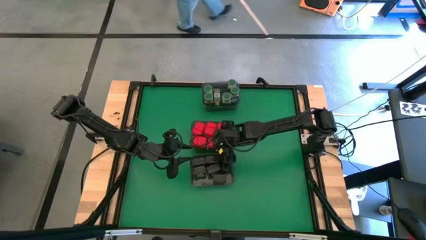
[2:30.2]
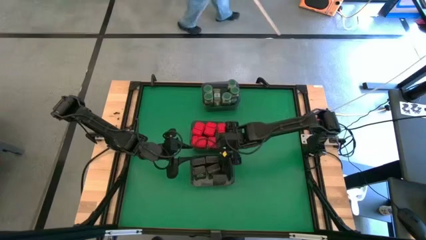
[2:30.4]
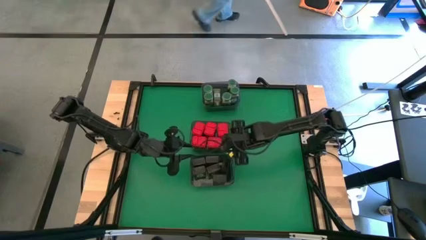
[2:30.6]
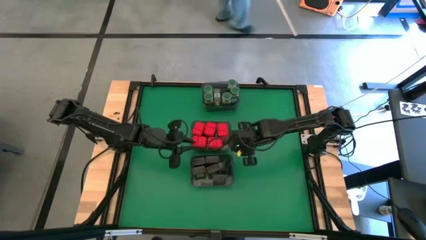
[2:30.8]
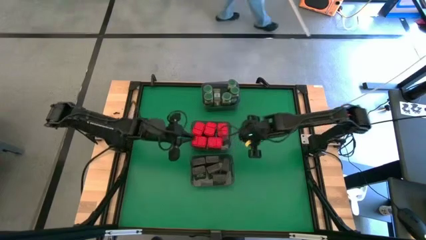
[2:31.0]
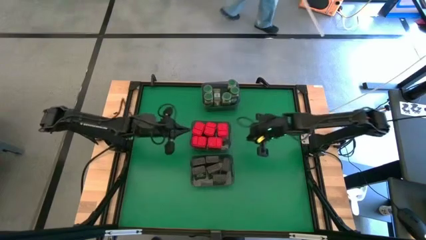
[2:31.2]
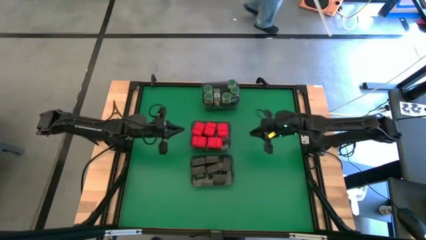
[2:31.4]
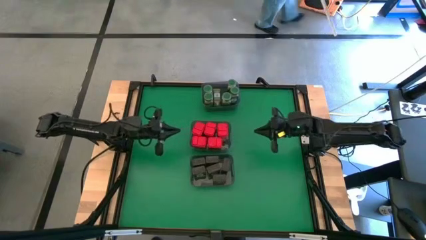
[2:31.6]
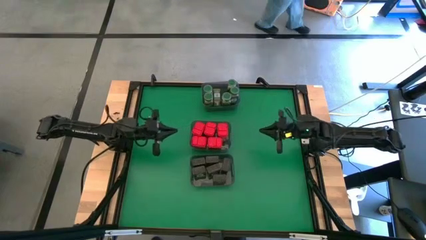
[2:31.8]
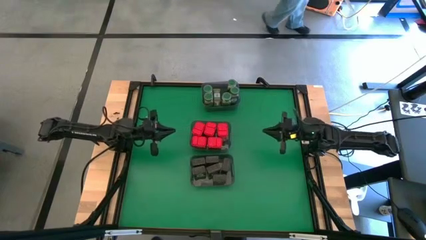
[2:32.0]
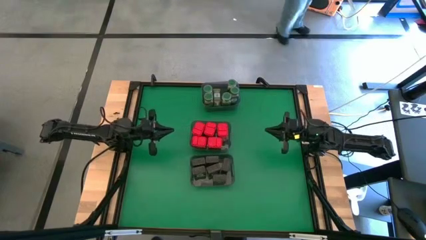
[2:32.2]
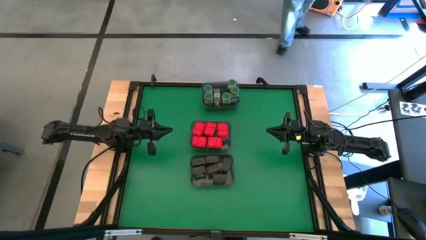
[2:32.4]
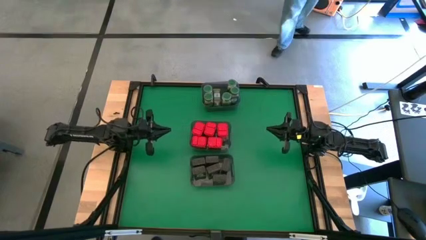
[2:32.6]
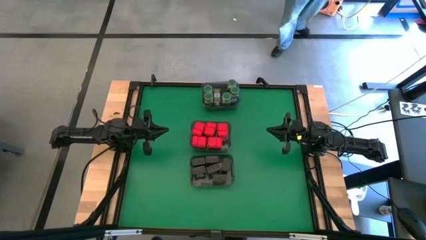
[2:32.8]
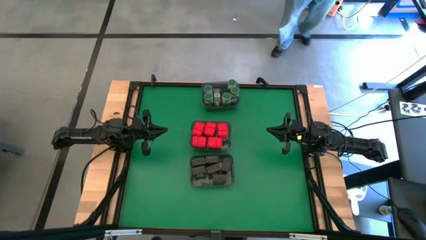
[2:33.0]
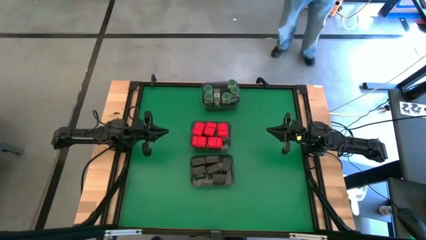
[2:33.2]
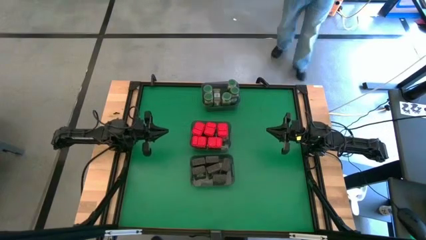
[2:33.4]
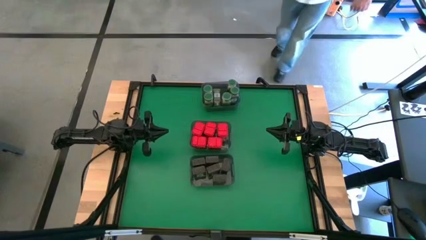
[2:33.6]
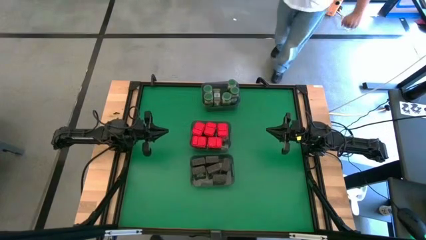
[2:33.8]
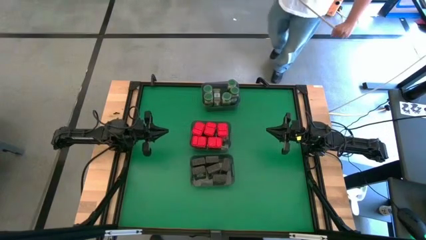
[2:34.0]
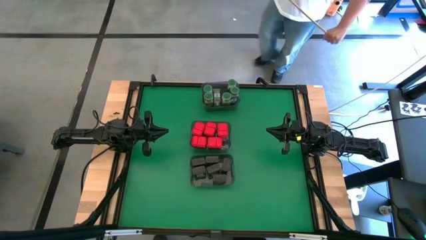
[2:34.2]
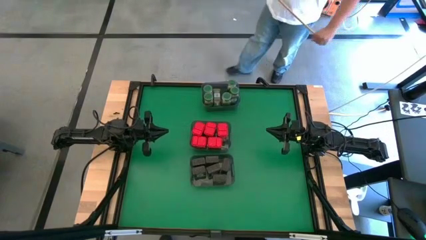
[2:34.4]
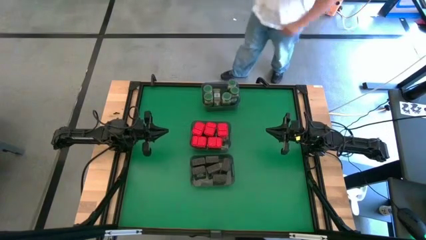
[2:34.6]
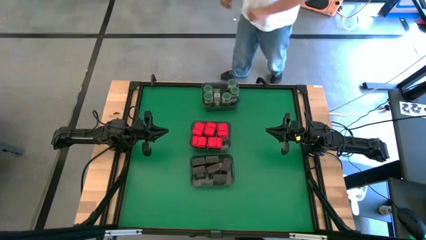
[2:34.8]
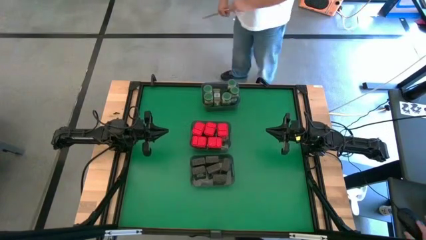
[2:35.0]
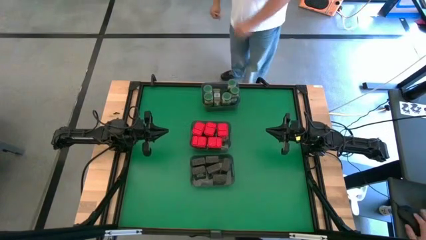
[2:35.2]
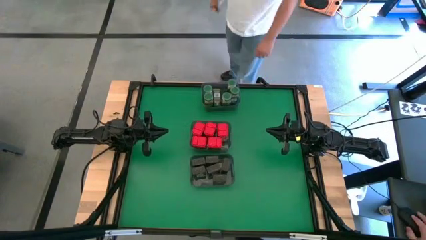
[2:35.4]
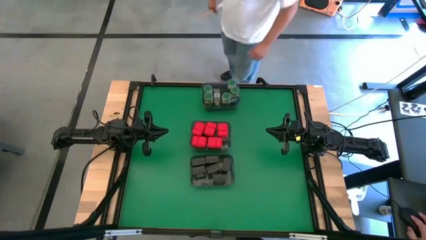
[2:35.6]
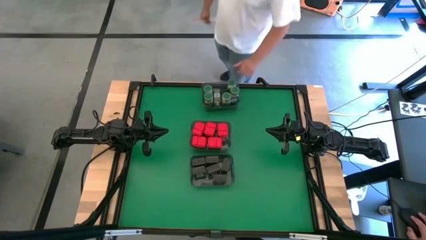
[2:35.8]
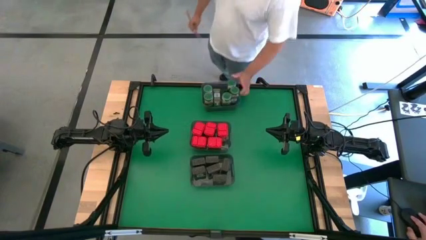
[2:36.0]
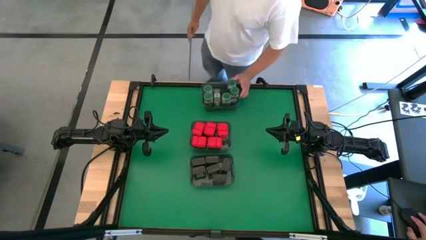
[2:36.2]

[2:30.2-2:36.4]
Task: Sort spices by type
Return to Home Position

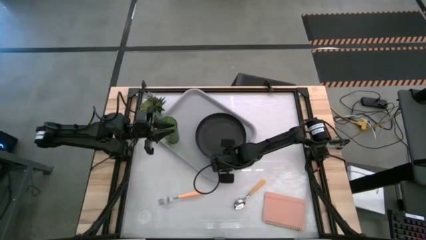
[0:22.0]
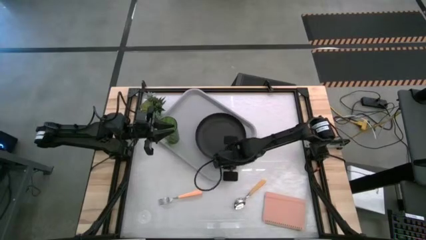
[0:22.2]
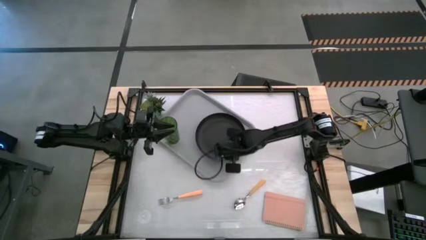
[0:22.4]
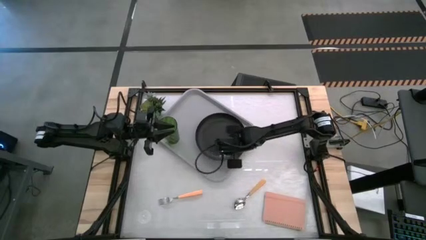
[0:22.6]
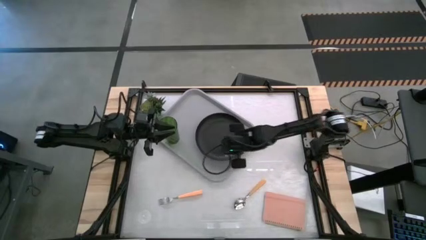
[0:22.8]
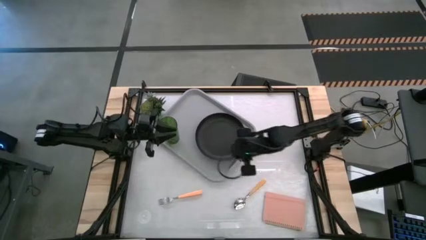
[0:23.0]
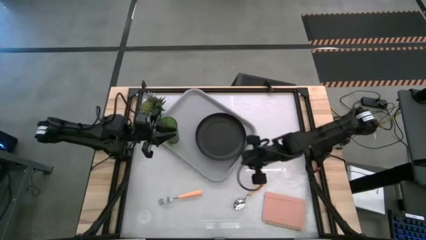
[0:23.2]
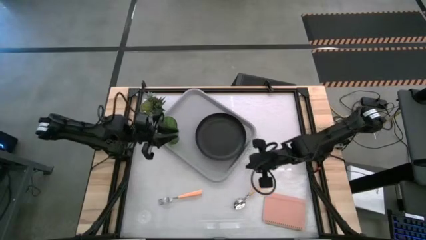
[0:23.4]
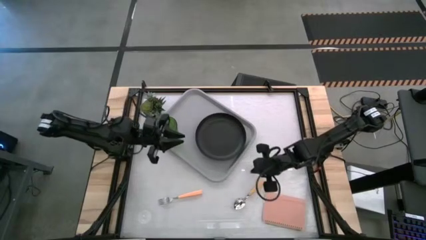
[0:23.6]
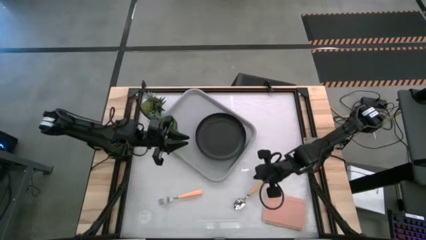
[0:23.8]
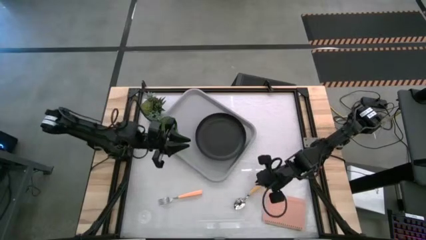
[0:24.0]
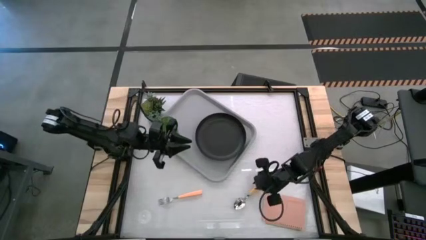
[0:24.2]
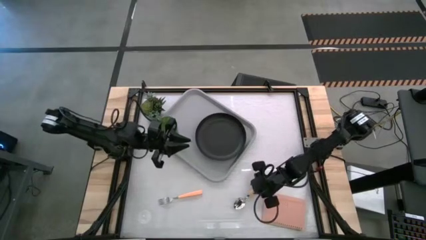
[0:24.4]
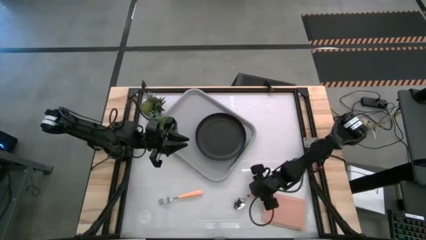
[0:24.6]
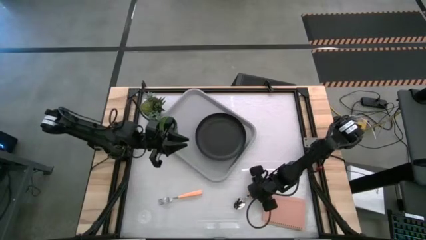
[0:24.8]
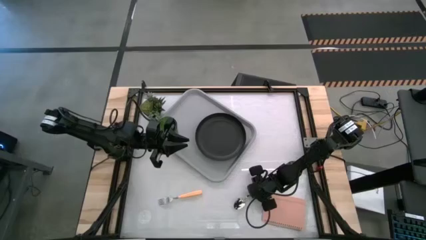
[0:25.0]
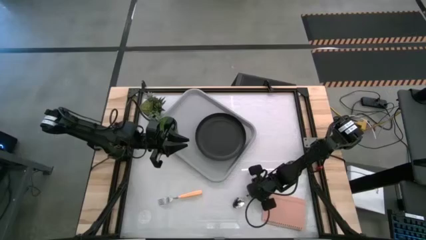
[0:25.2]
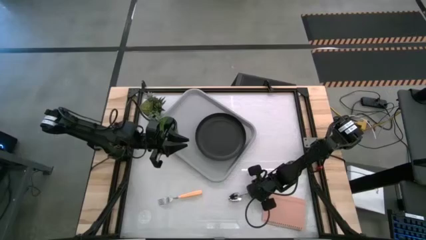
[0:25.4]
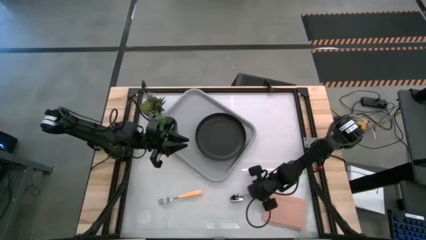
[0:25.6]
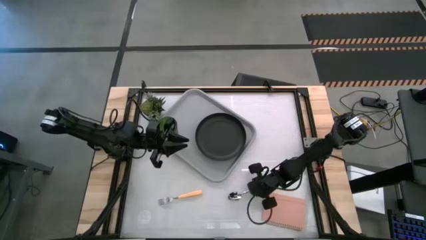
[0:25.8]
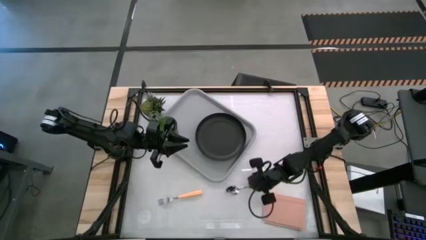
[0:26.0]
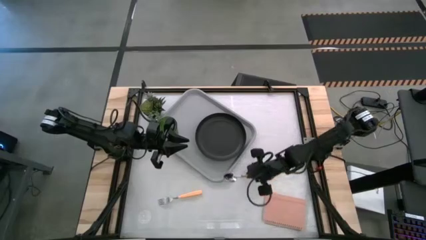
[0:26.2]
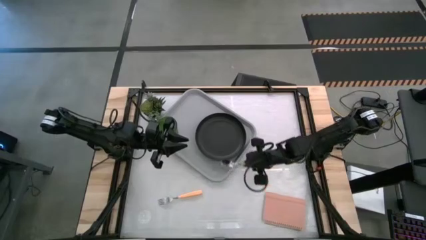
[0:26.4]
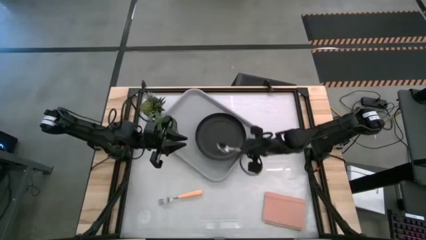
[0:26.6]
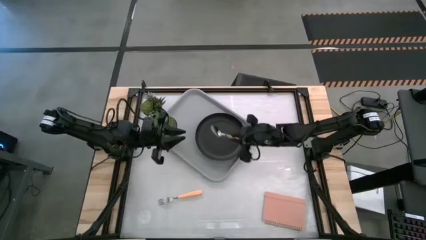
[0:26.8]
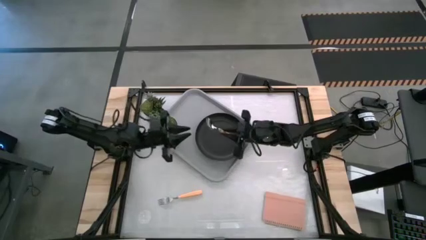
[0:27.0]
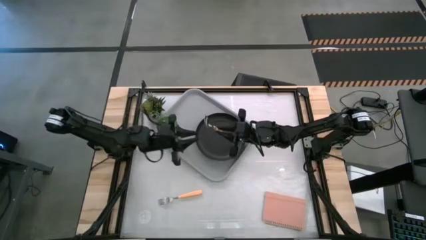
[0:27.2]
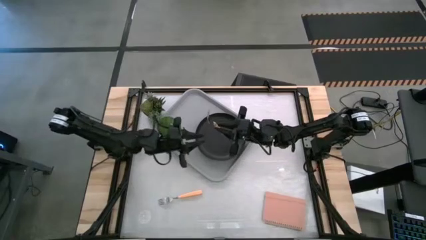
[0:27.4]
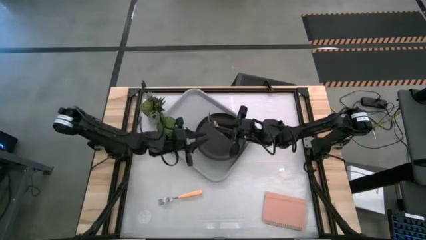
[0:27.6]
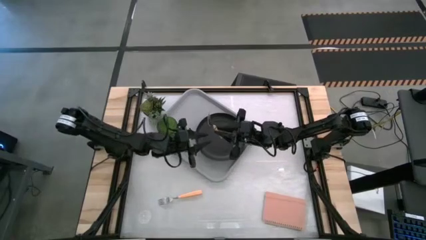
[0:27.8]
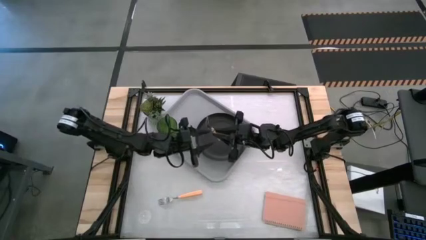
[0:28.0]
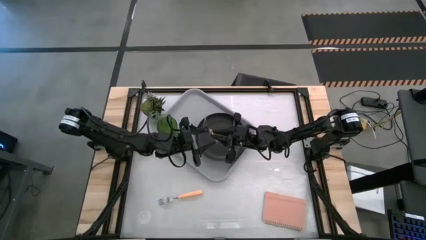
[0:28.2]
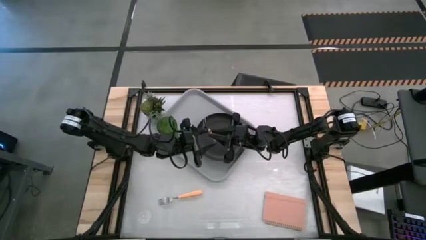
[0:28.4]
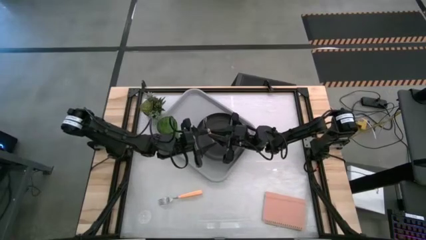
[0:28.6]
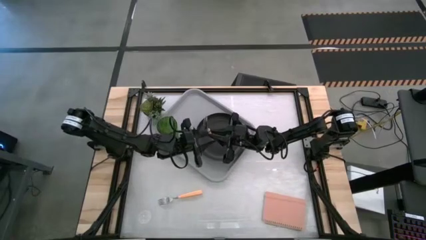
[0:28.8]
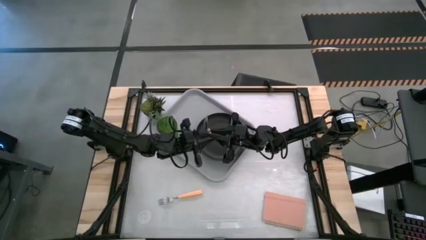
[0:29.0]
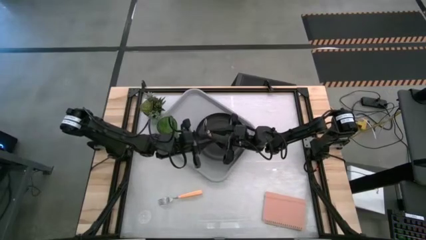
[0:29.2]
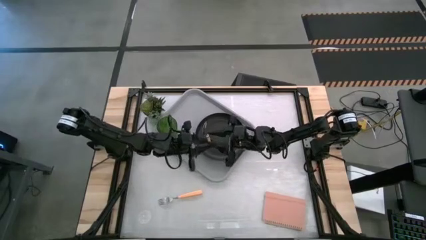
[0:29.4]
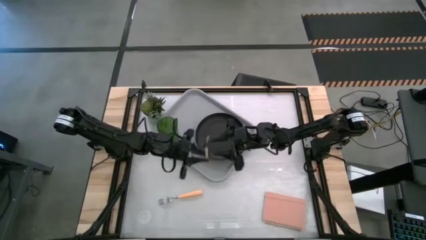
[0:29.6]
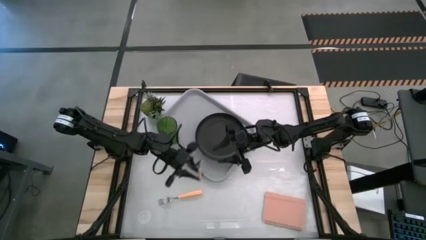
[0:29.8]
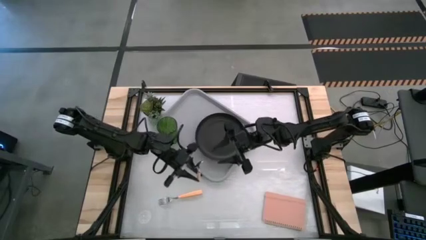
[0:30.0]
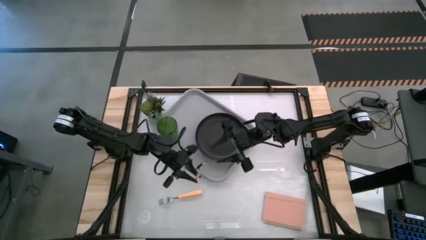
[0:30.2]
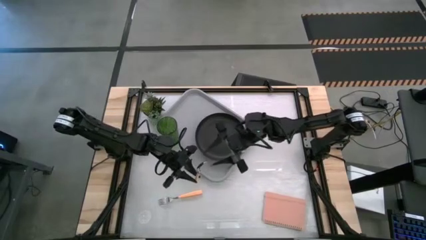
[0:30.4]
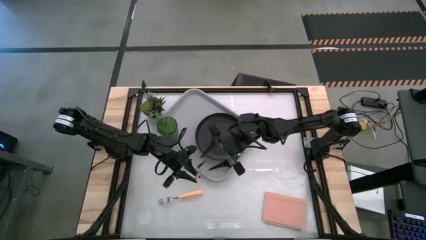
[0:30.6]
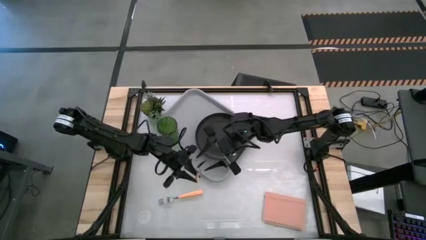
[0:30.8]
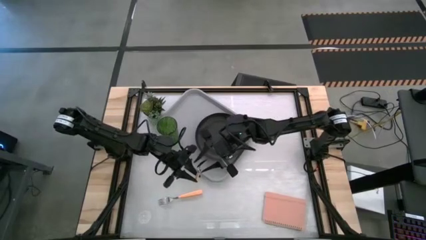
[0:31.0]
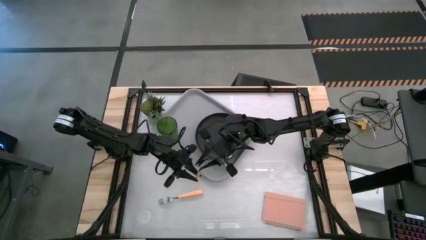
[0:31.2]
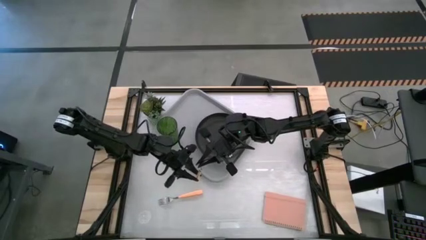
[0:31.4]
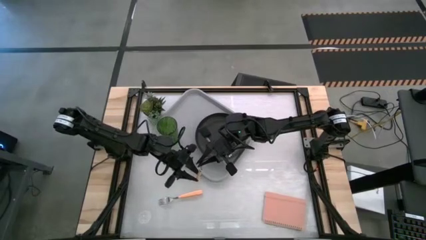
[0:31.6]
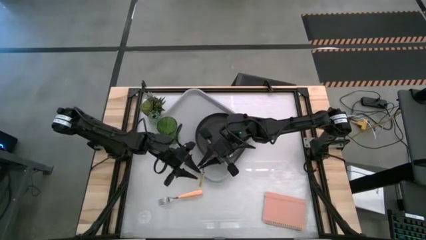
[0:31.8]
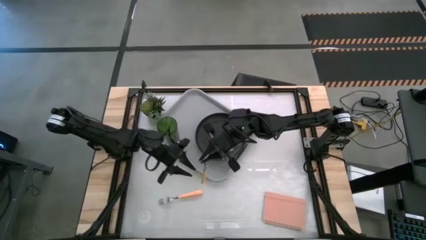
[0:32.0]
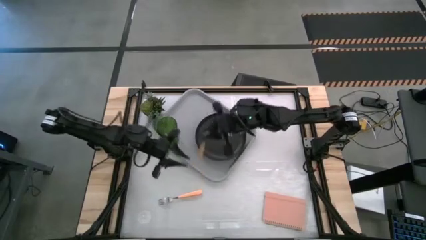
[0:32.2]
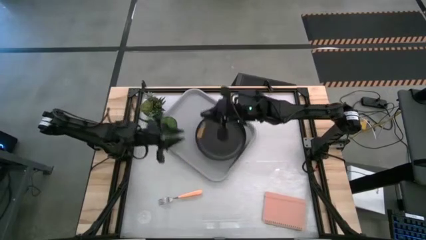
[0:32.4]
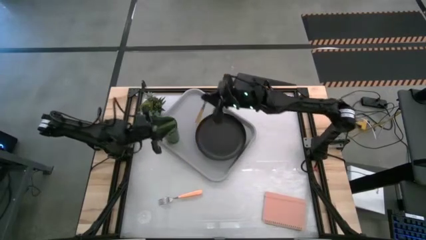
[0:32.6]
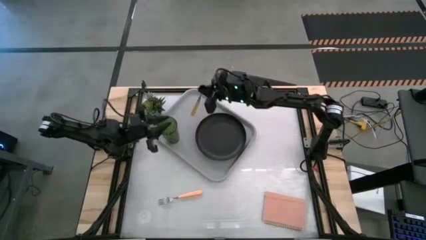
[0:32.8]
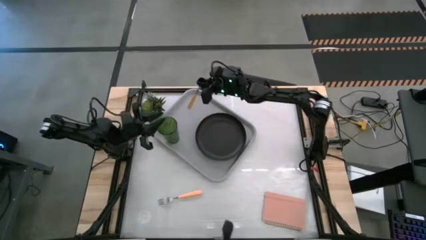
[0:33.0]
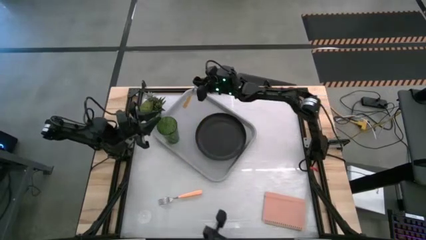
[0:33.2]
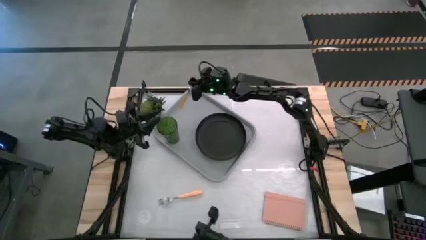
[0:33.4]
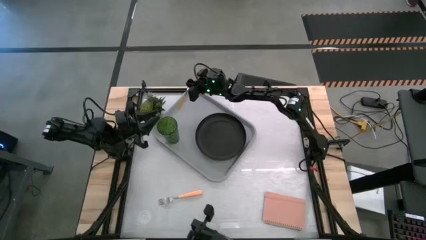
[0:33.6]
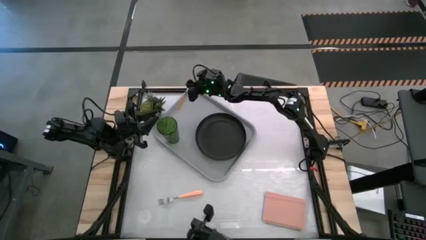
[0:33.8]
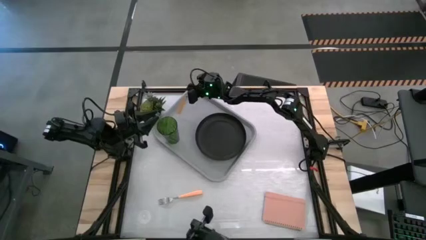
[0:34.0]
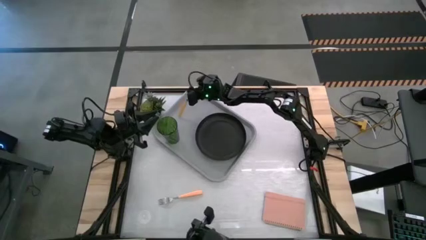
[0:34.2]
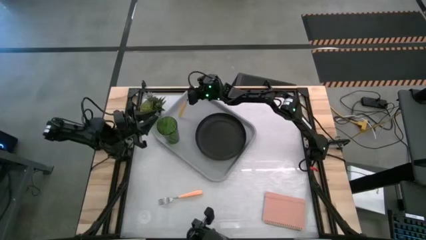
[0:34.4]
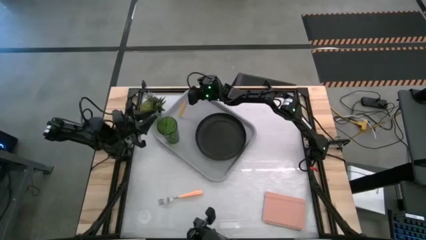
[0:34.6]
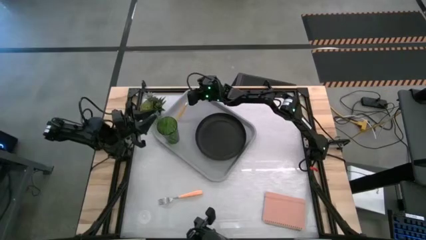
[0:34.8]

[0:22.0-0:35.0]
Task: Pick and place plate/cup/fork/spoon on tray
Put the orange spoon on the gray tray
